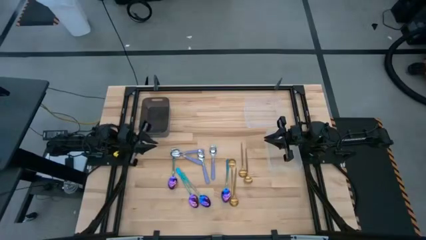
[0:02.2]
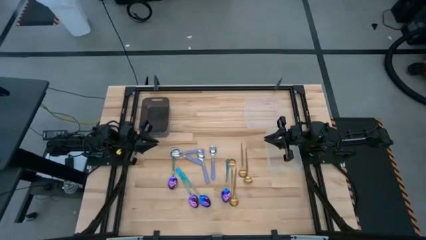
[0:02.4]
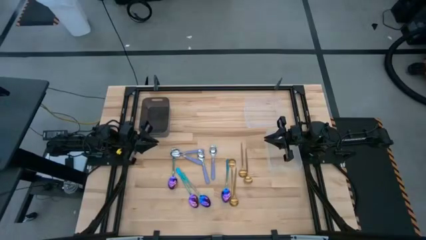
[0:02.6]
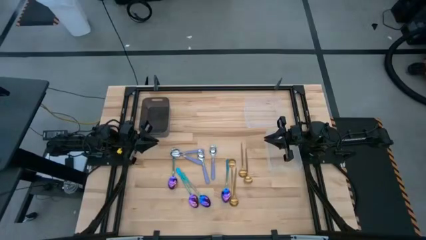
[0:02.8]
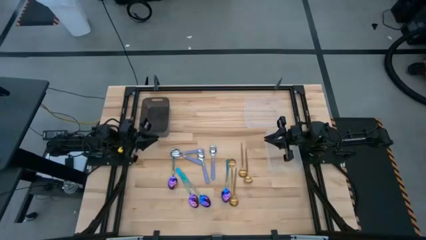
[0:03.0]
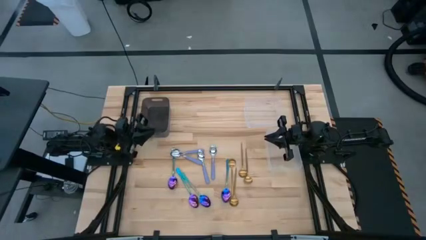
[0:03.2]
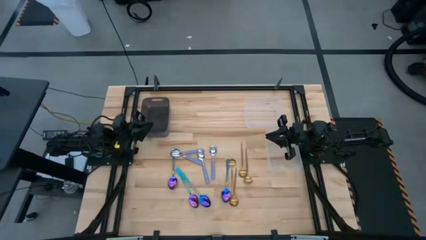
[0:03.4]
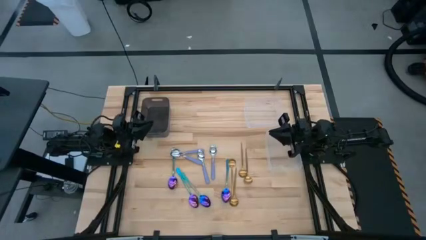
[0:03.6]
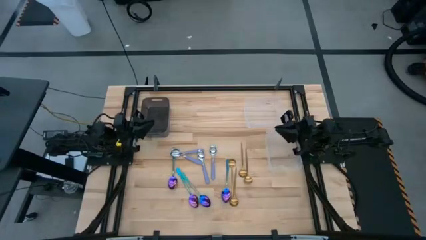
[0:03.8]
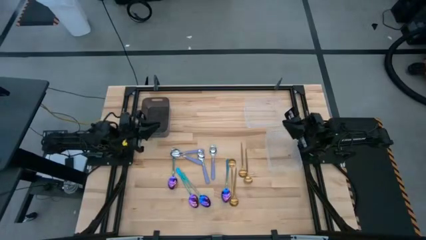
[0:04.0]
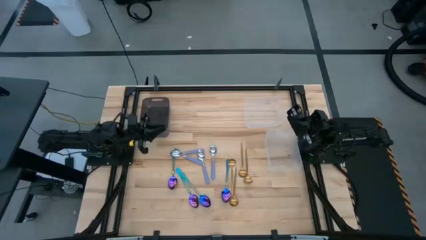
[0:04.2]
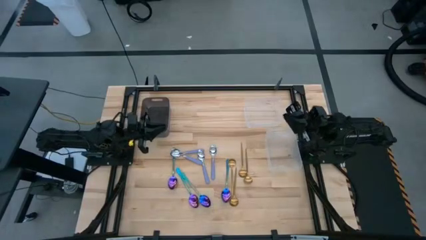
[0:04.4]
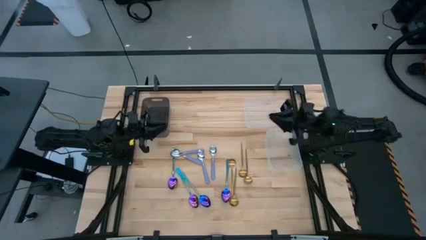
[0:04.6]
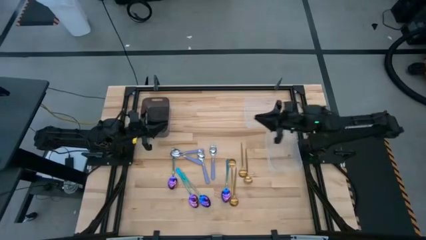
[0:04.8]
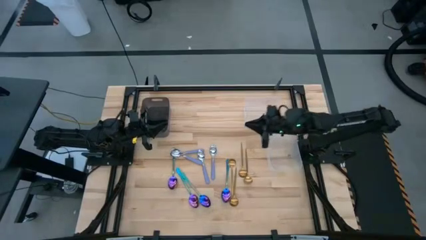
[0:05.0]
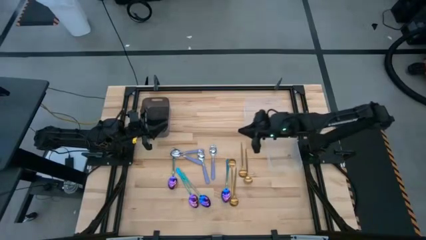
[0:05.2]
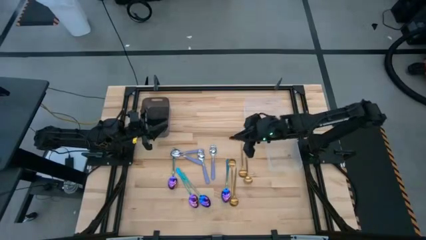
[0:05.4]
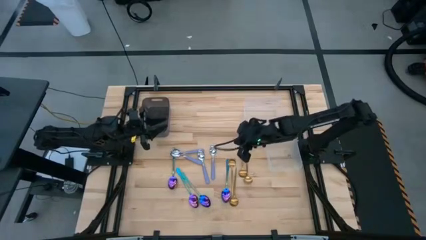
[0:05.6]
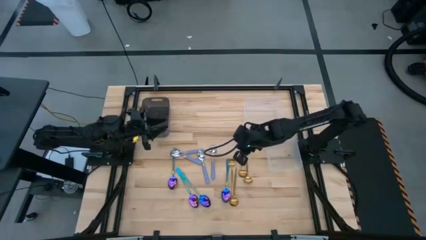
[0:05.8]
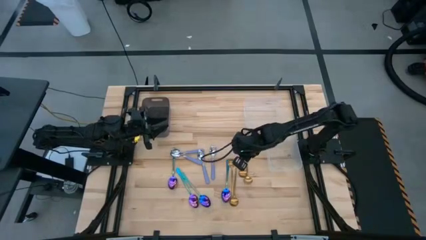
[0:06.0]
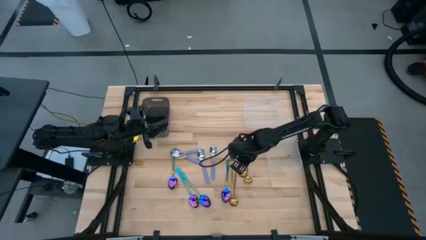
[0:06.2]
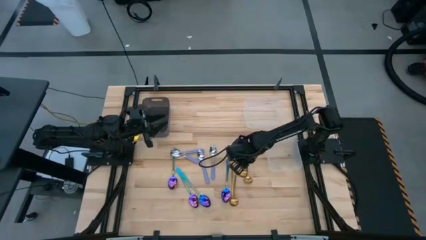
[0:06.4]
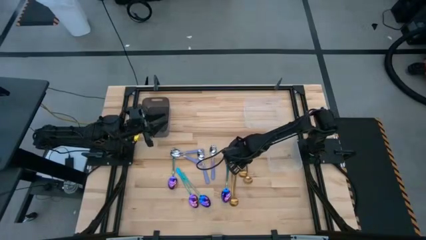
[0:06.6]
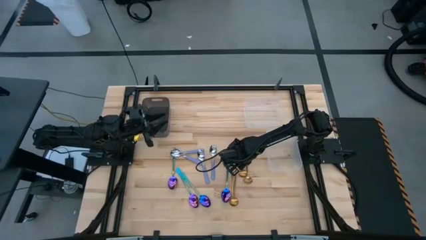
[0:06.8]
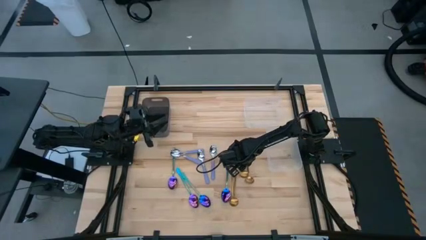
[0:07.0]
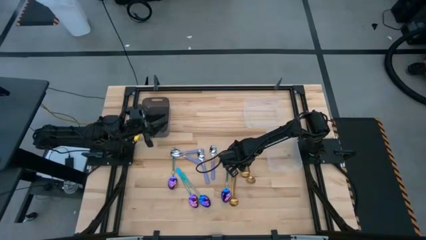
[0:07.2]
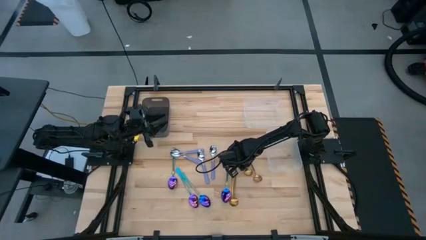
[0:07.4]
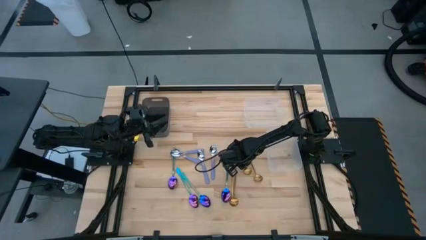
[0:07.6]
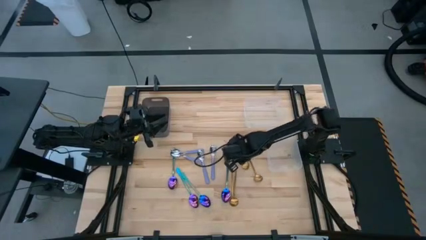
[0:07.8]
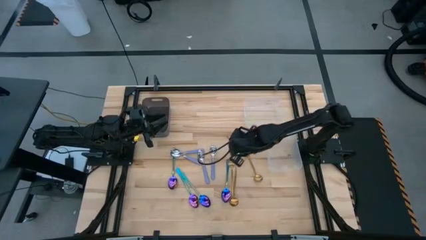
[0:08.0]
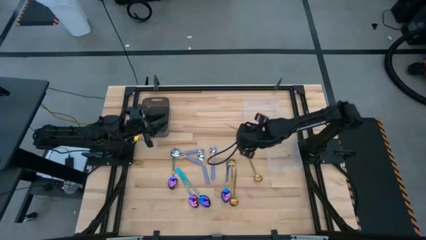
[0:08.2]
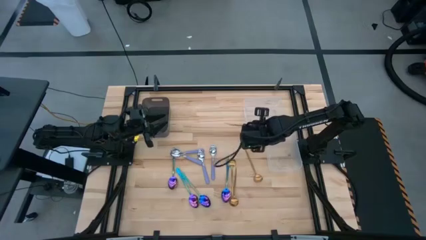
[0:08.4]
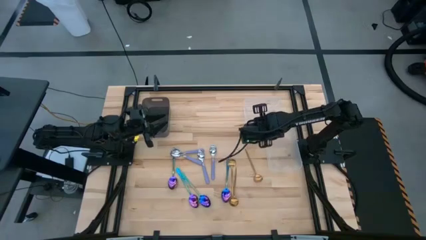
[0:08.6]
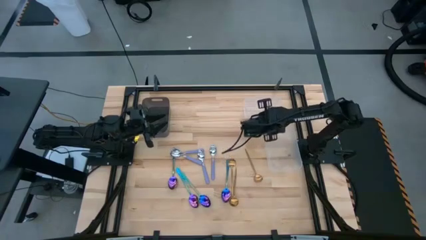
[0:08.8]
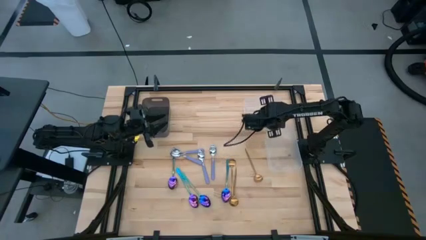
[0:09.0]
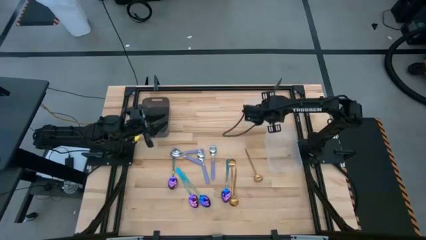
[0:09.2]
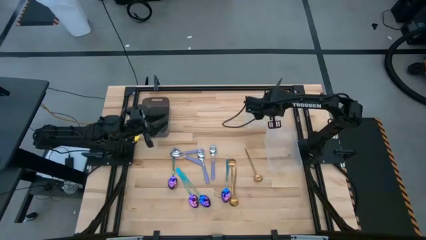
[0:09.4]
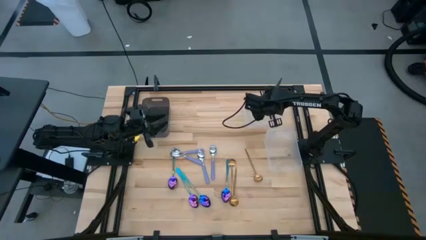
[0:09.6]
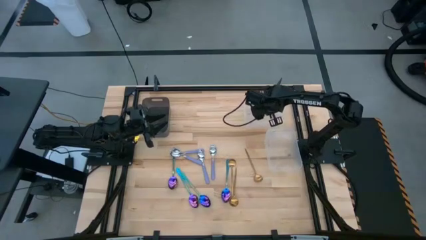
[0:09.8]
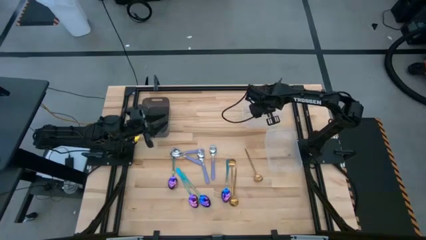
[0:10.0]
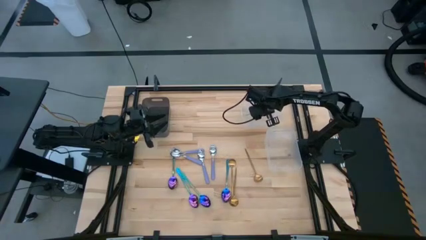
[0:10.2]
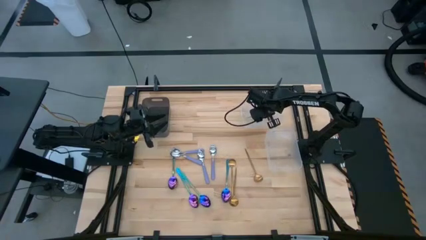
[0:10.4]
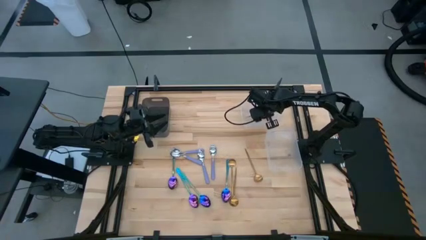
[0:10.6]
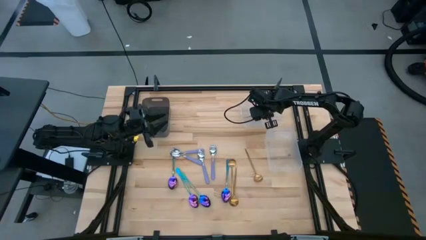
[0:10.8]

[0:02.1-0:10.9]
Task: Sort silverware by color (type)
Put the gold spoon into the top transparent bin

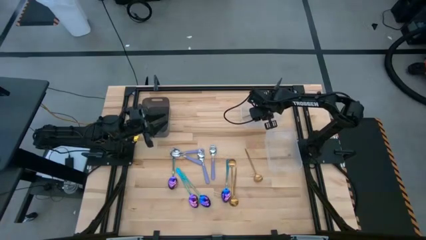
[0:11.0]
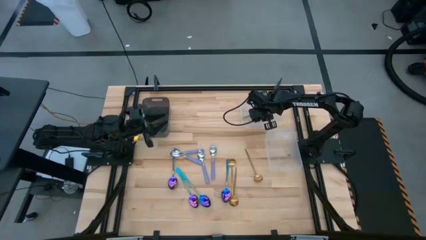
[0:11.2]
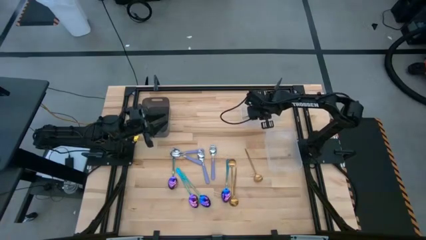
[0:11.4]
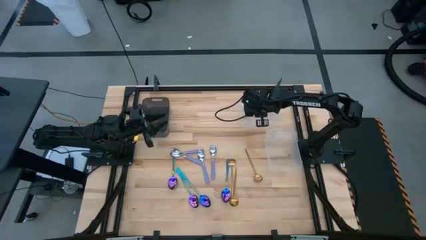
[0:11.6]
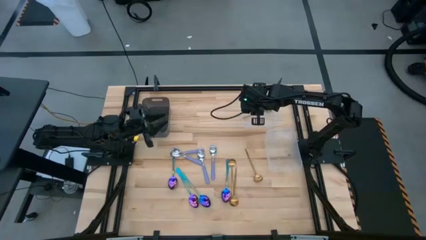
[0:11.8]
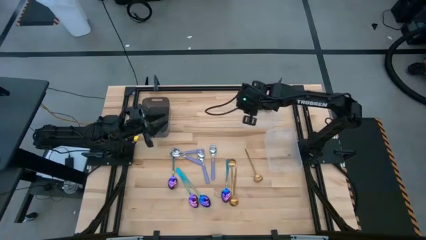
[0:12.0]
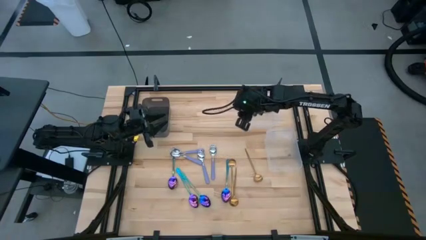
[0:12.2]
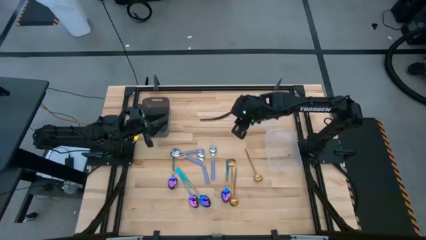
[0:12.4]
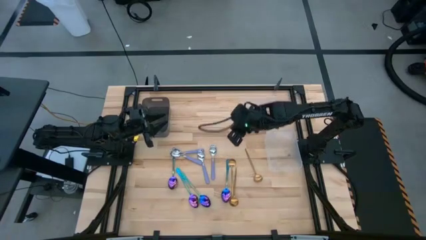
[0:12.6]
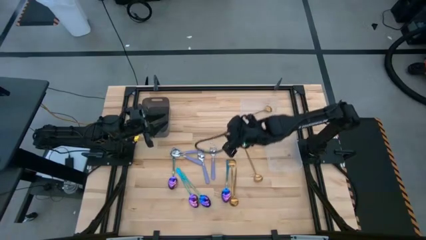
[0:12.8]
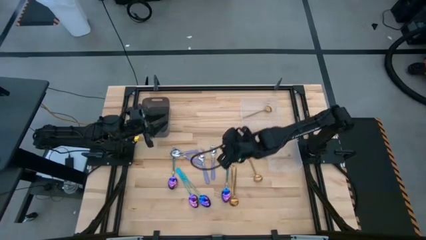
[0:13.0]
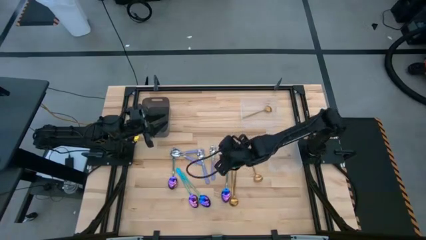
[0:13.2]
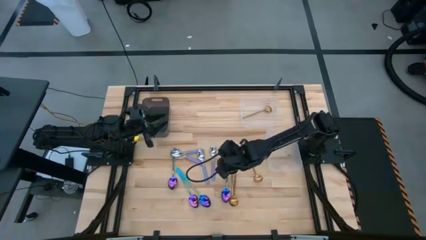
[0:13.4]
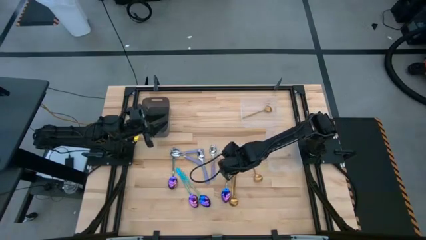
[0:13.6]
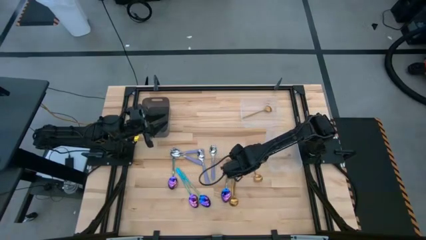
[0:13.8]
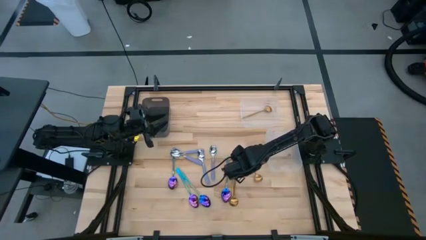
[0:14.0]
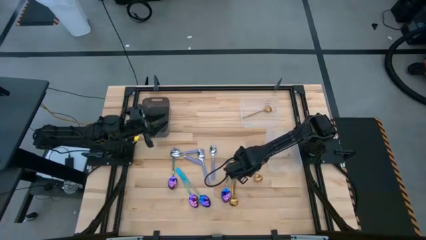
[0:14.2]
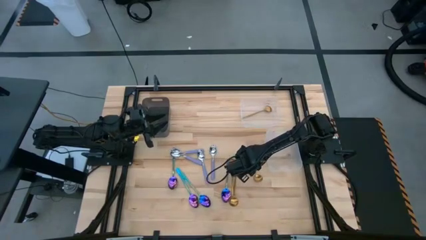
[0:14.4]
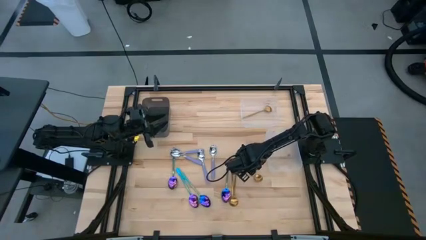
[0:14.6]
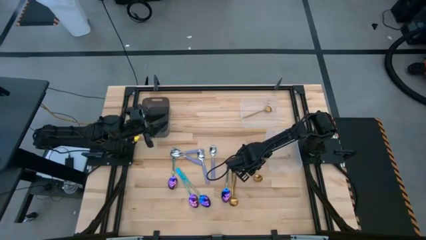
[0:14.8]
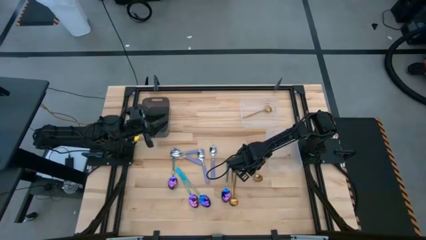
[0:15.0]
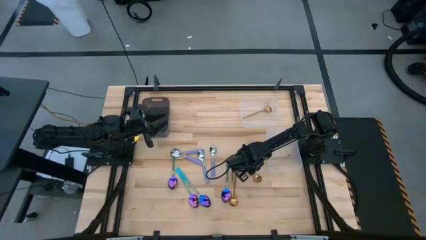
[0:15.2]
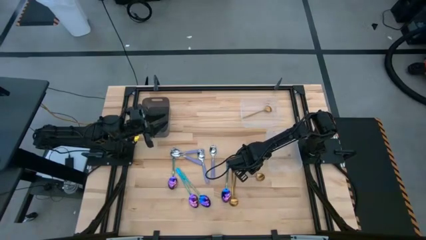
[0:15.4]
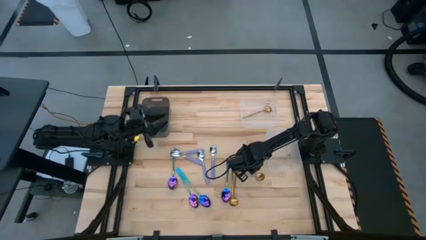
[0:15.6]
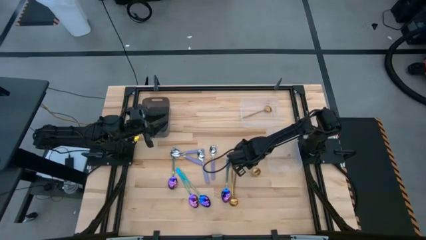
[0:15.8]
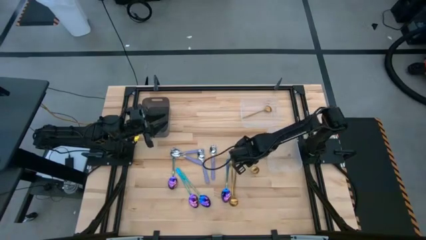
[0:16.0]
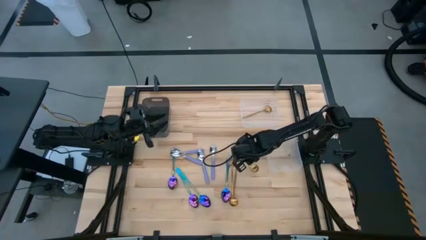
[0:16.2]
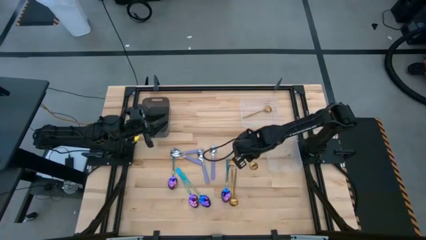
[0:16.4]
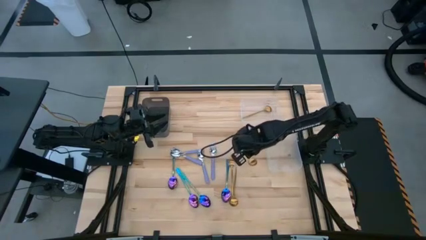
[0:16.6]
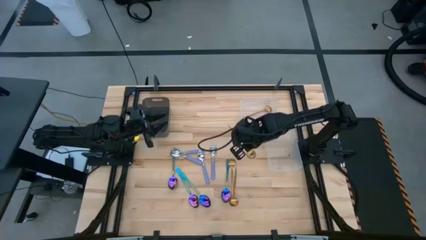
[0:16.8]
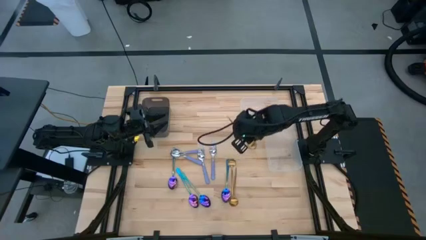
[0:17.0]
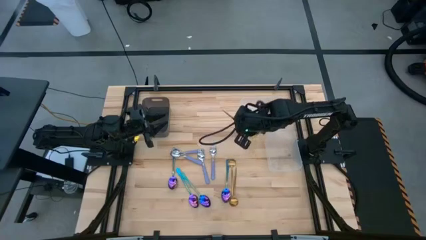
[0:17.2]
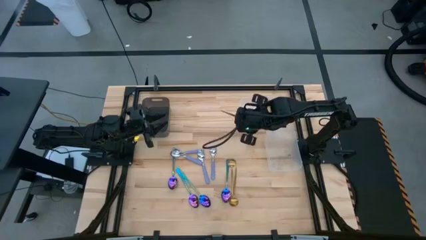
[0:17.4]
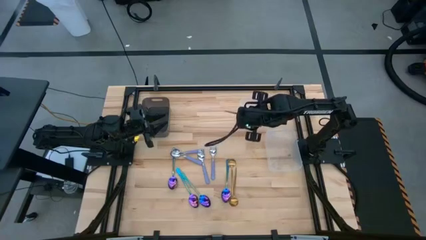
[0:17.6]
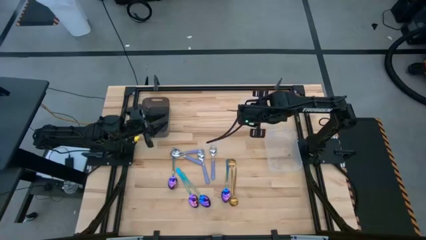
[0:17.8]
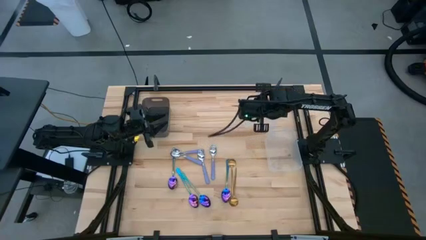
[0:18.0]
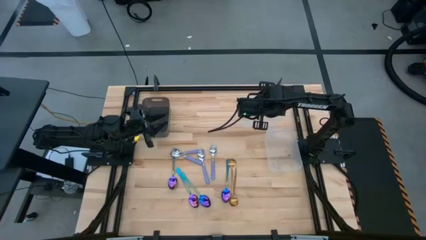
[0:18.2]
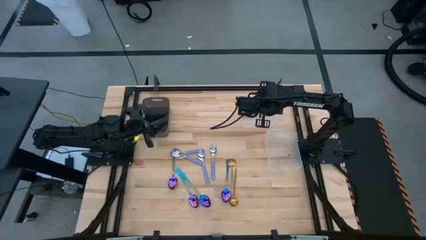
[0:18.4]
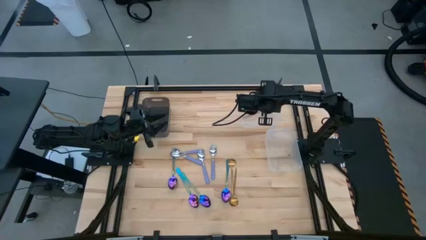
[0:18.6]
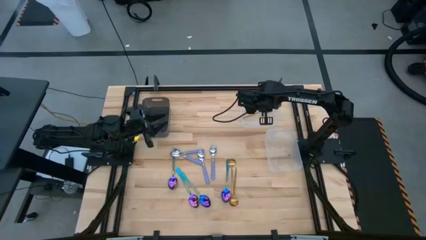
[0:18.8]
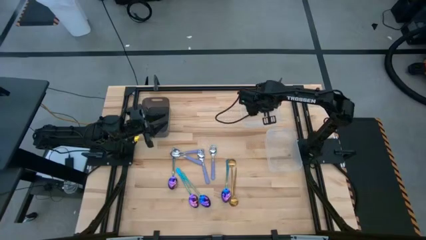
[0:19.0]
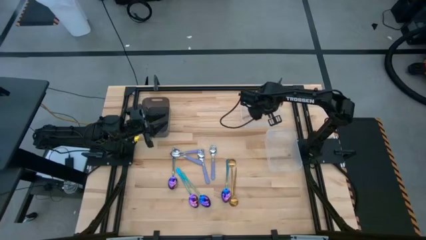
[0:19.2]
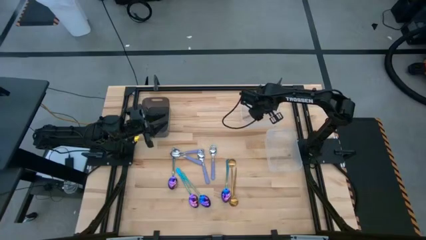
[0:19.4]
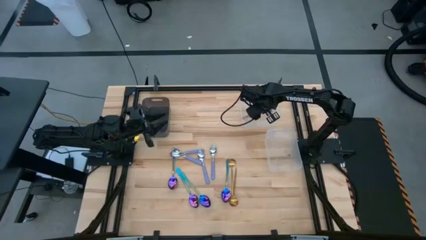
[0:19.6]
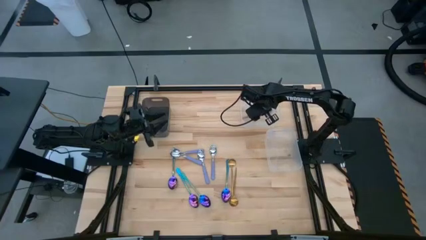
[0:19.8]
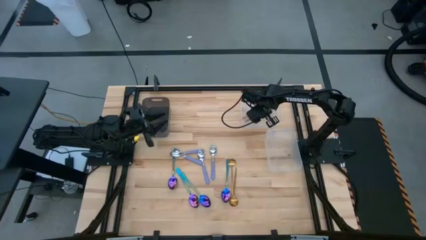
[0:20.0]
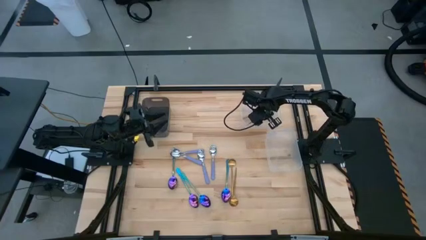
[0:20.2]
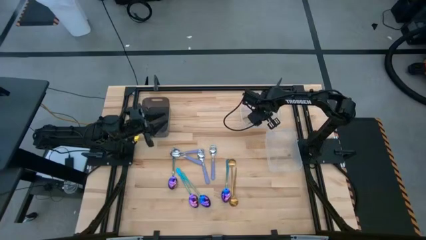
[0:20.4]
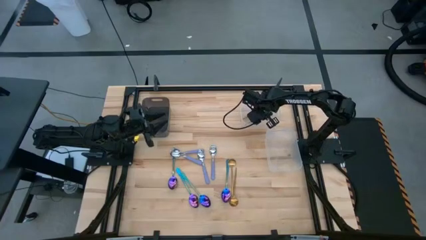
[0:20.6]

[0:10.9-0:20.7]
Put the gold spoon into the top transparent bin
